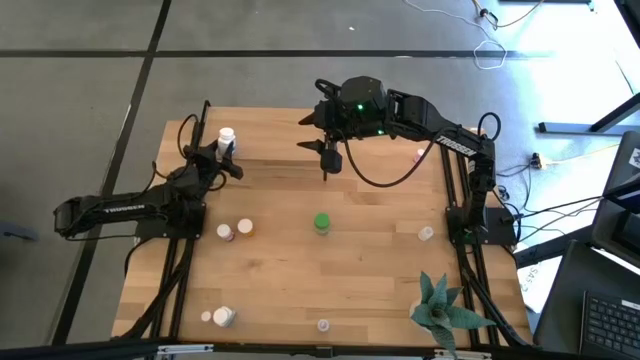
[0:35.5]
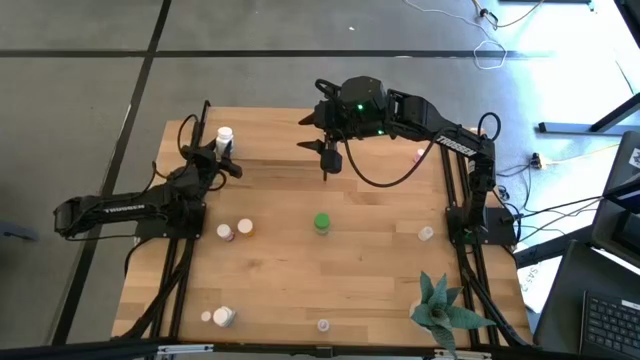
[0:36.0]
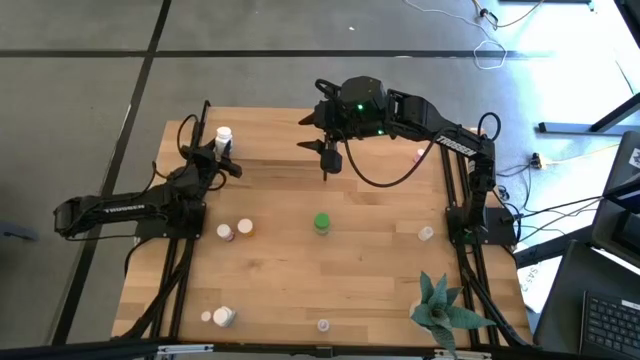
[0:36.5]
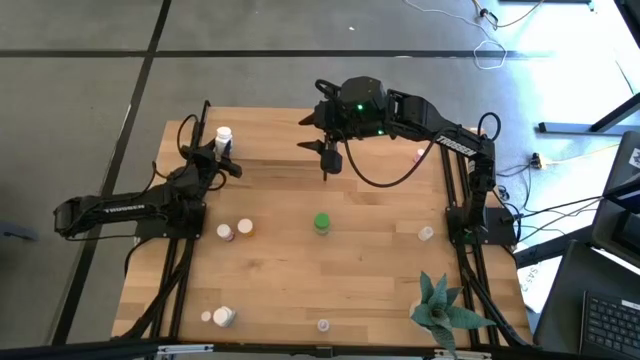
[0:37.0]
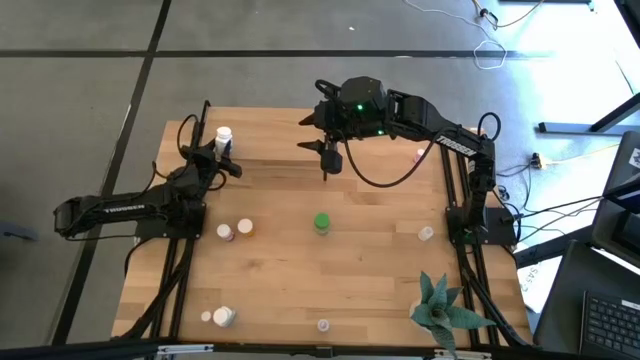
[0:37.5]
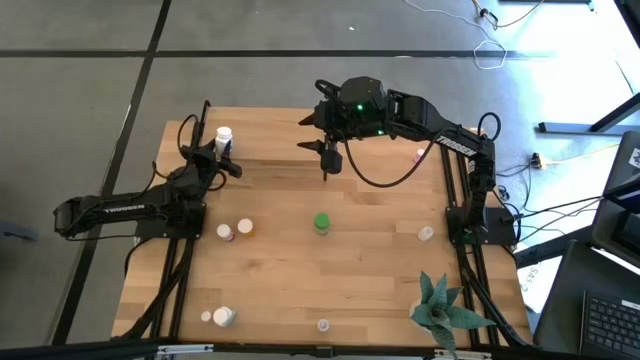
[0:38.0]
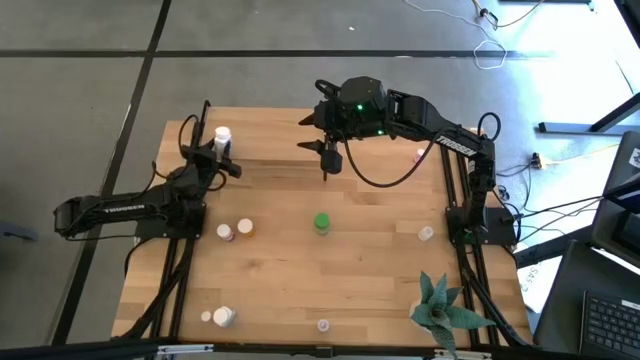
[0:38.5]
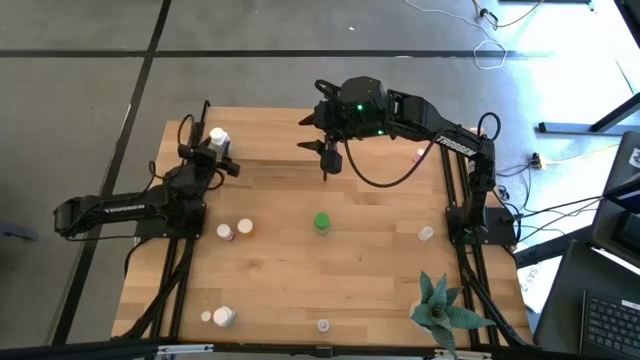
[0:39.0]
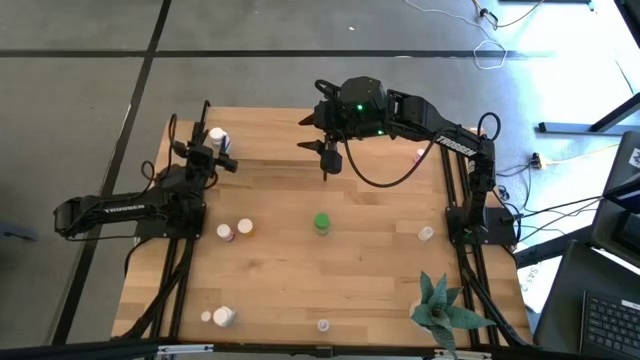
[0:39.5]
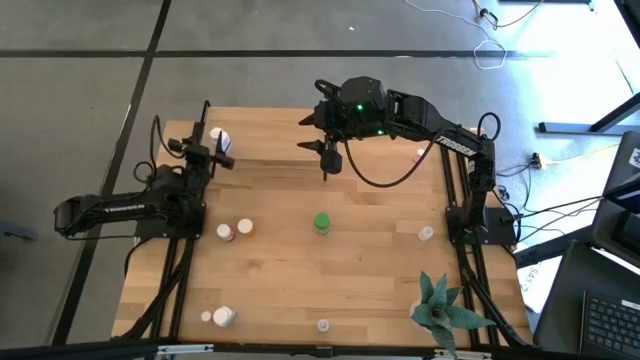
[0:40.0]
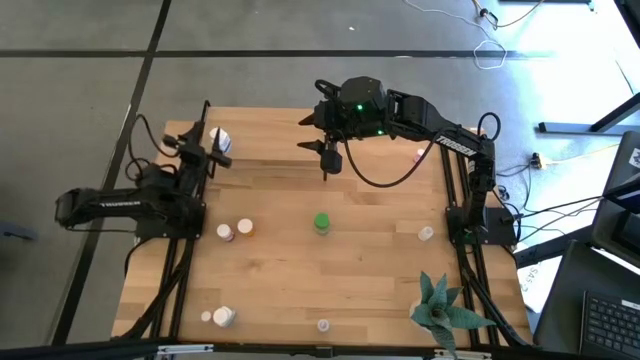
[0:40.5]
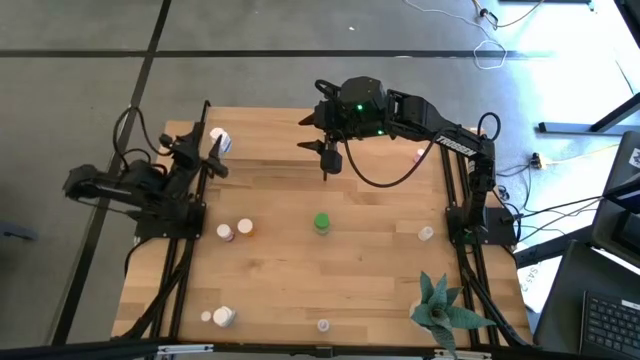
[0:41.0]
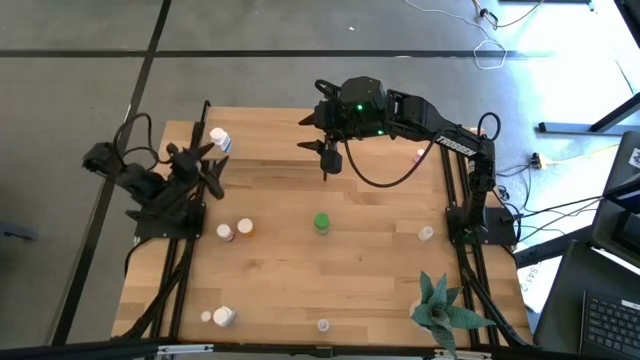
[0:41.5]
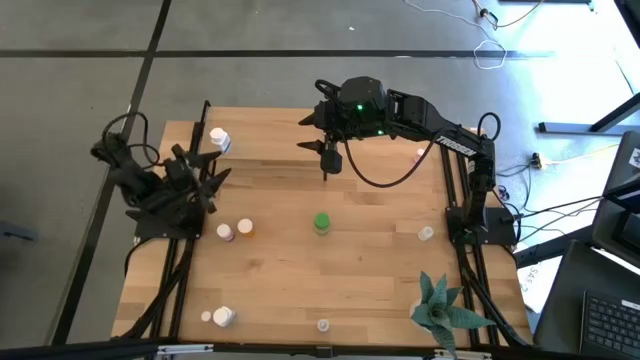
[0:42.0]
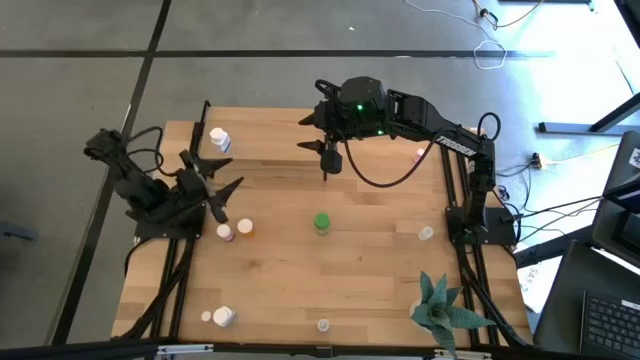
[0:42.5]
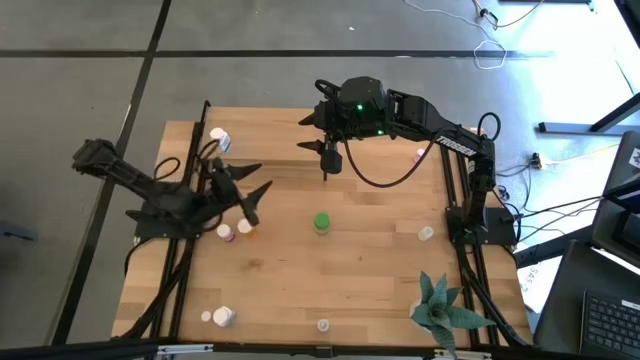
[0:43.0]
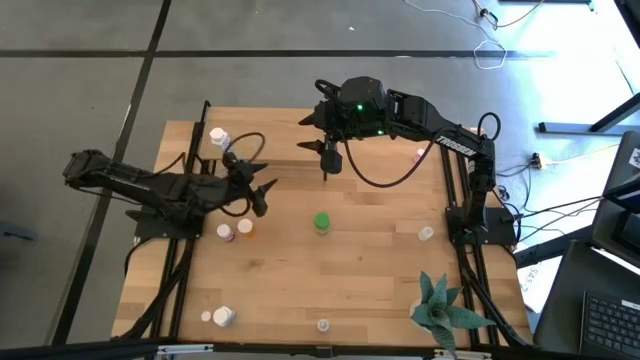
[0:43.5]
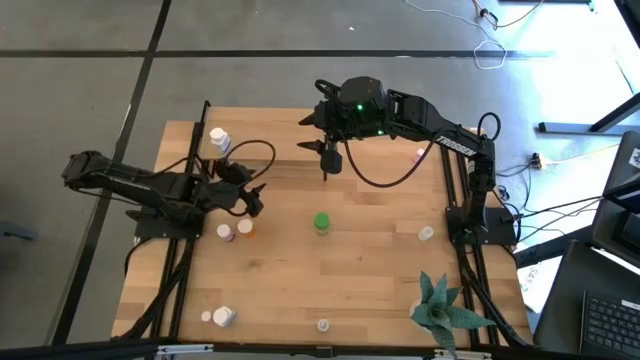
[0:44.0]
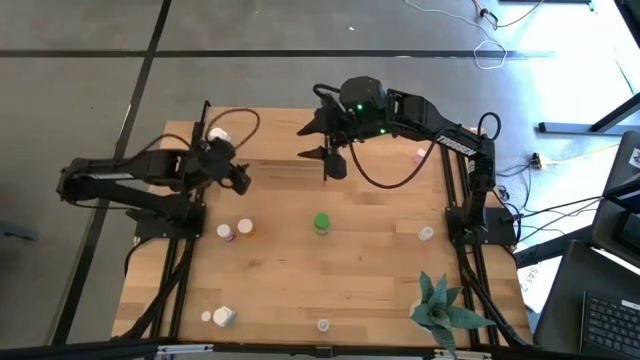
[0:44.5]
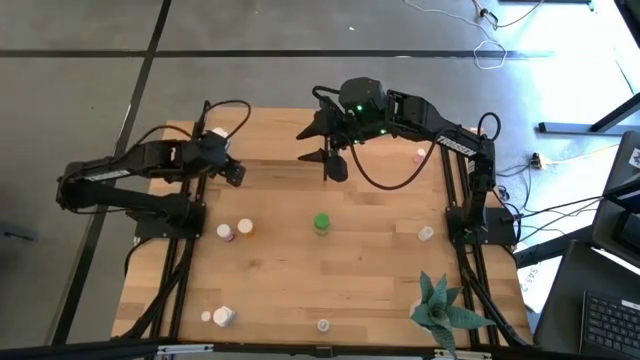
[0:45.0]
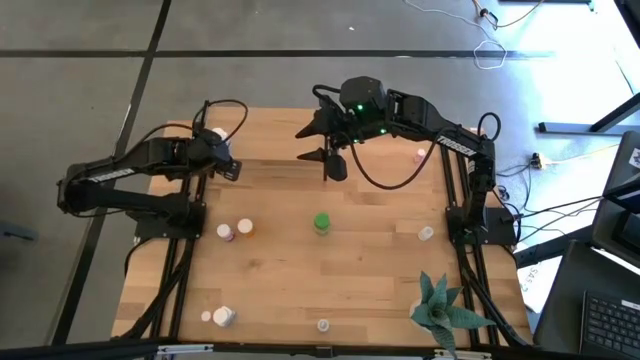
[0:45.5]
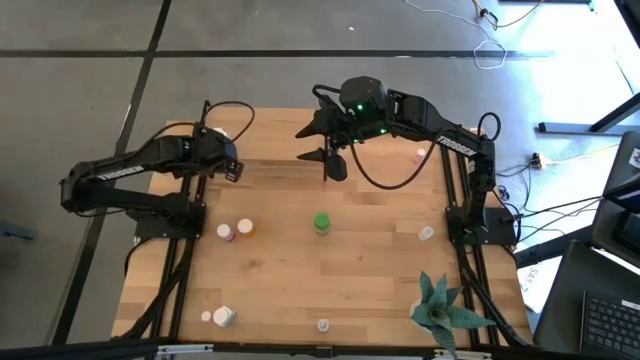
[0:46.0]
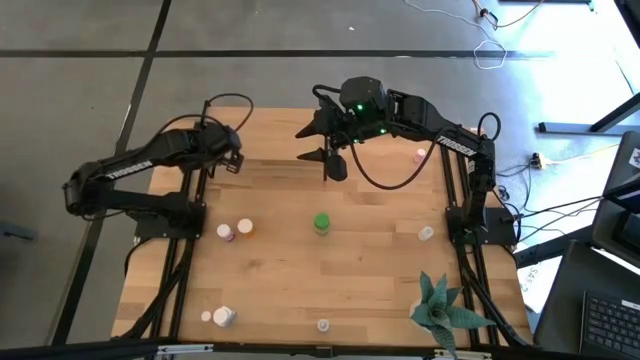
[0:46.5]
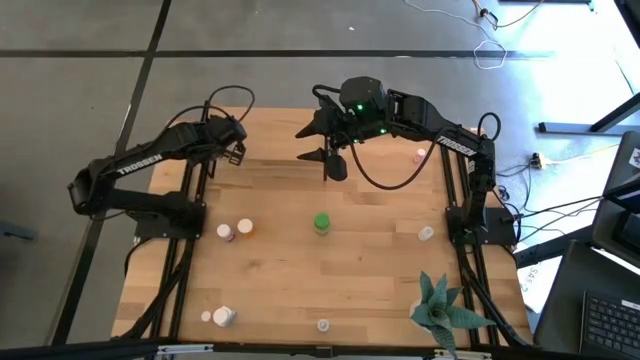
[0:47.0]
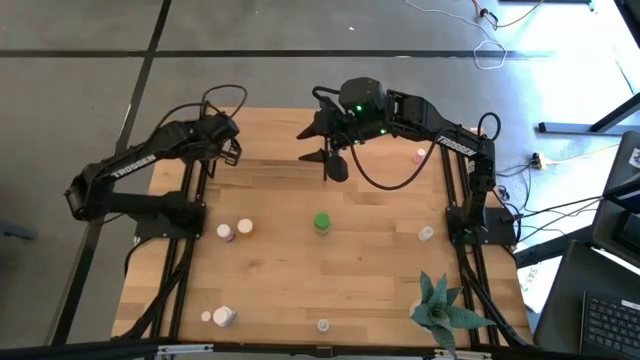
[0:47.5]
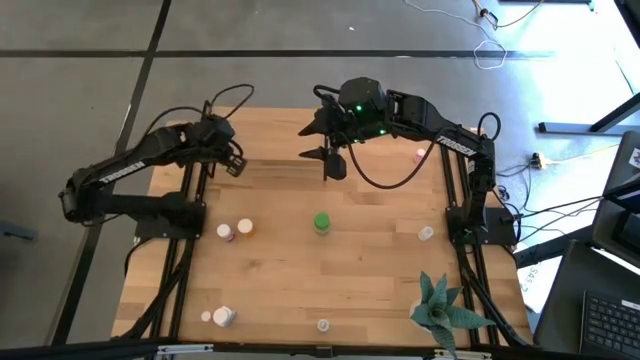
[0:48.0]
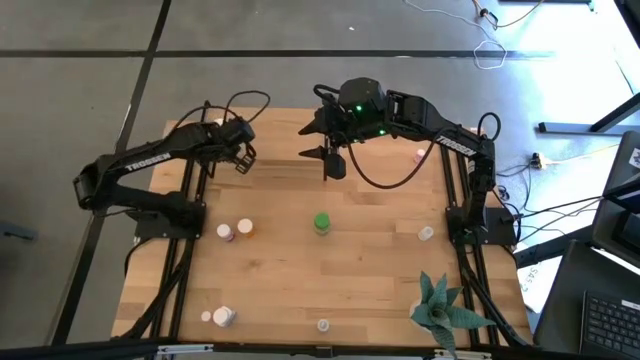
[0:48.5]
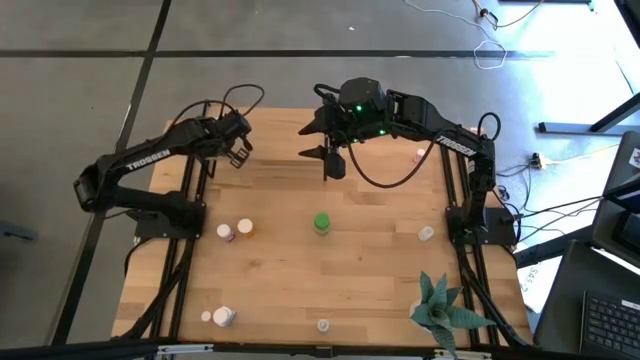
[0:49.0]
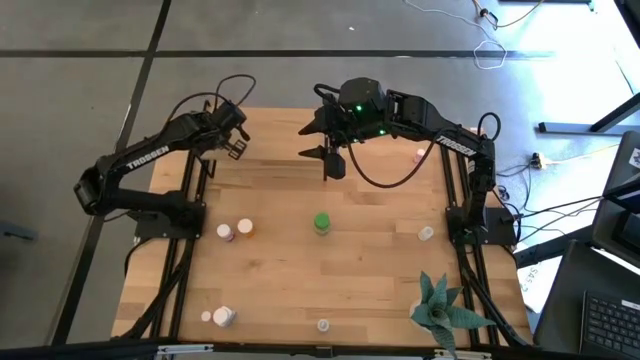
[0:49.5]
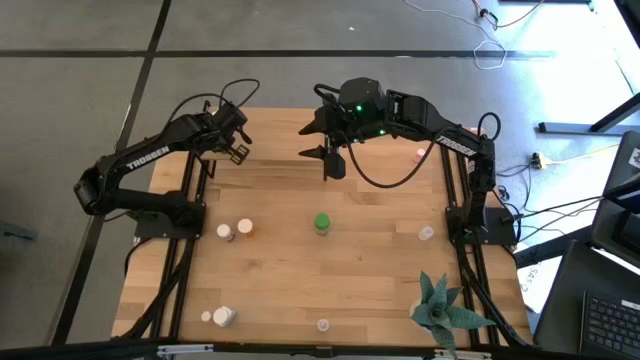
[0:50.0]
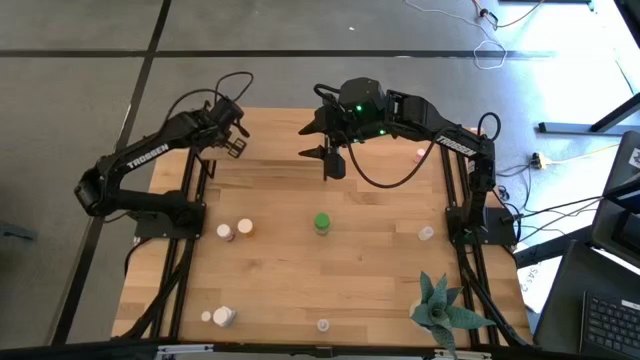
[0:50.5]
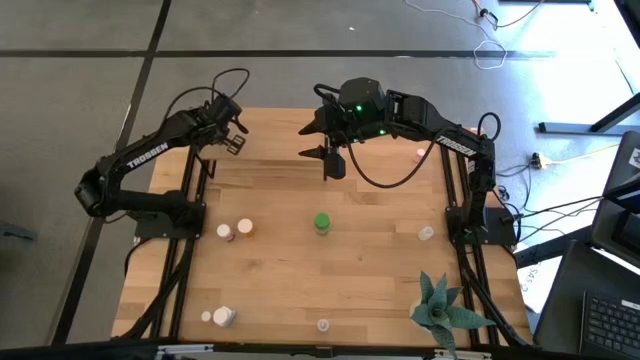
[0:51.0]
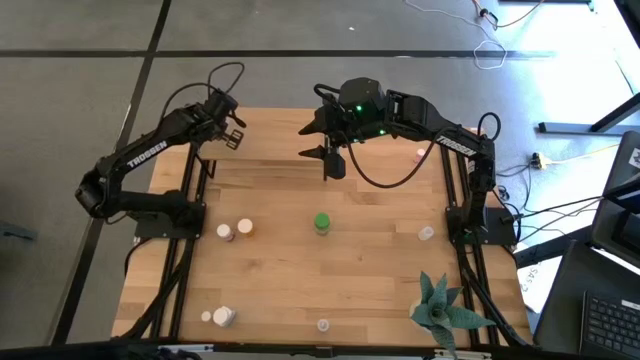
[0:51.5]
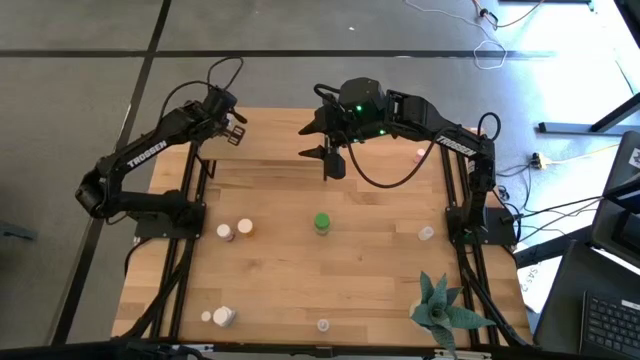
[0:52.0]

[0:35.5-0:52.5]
Task: Pick and place medicine bottles onto shelf by color
Put the top white pill bottle on the shelf

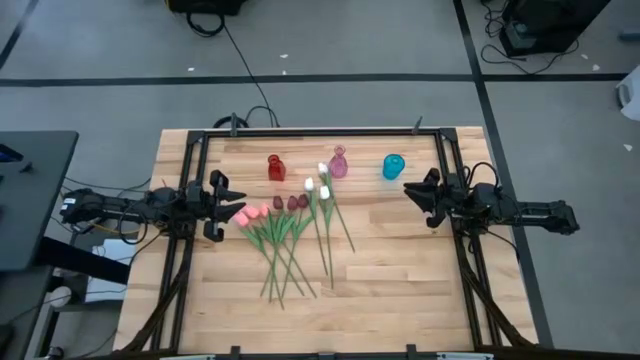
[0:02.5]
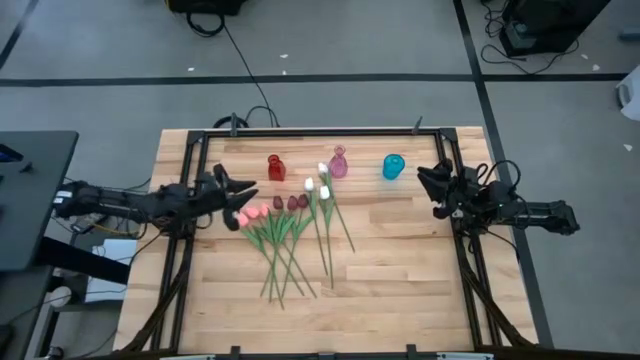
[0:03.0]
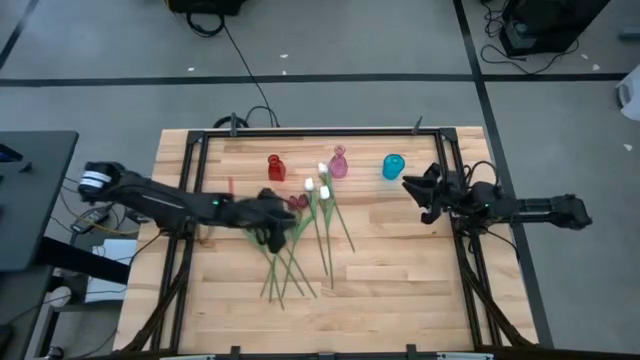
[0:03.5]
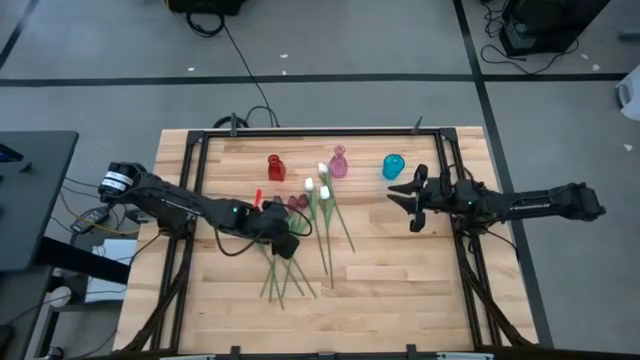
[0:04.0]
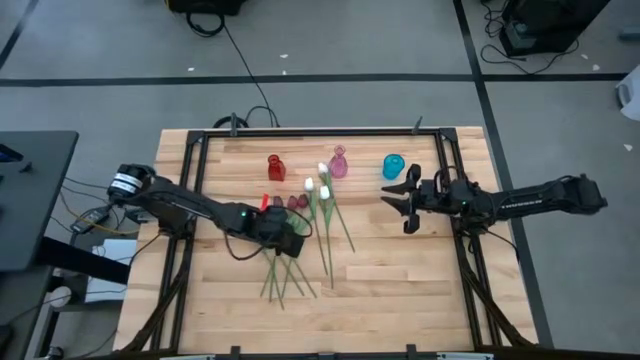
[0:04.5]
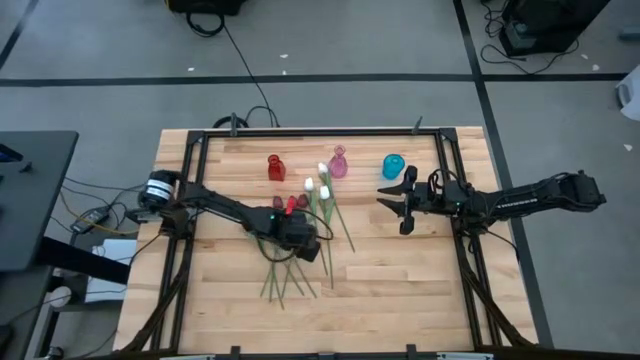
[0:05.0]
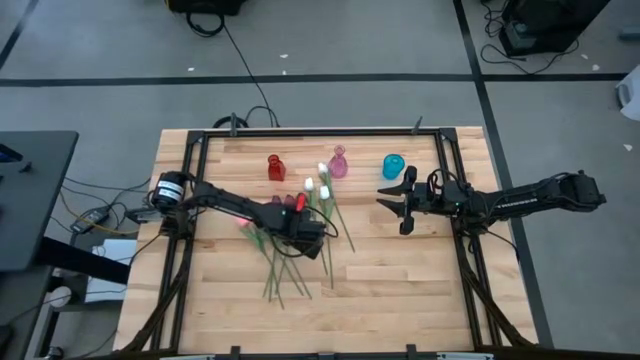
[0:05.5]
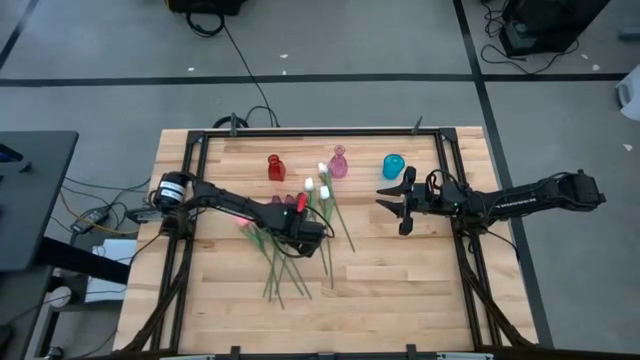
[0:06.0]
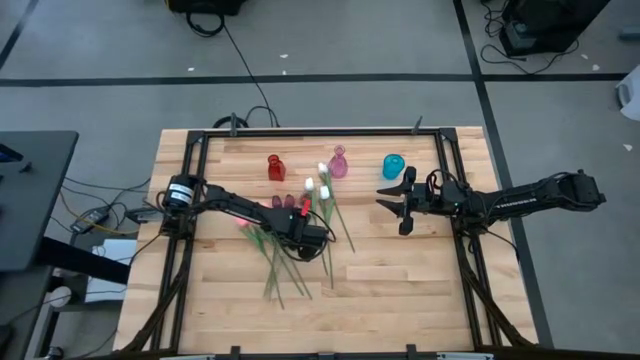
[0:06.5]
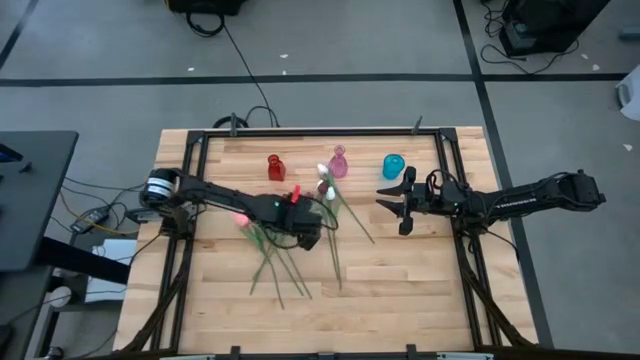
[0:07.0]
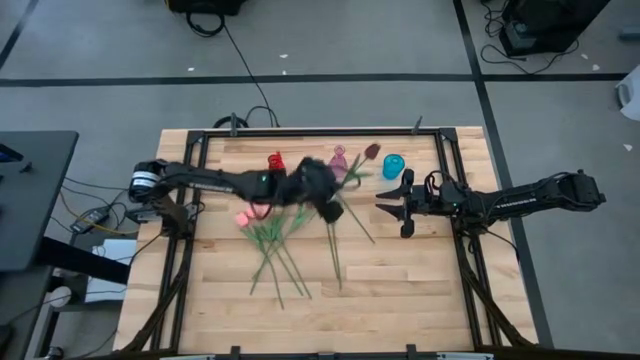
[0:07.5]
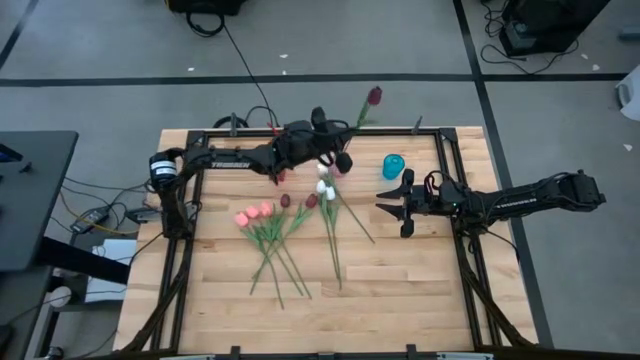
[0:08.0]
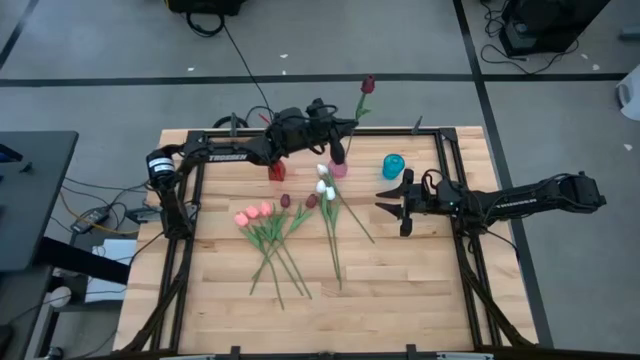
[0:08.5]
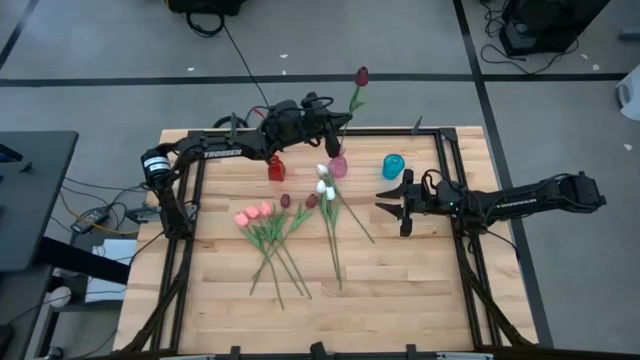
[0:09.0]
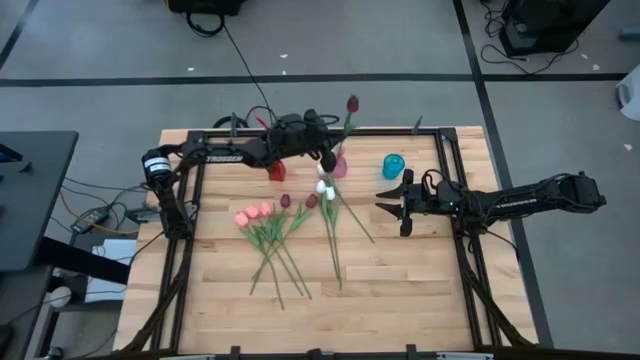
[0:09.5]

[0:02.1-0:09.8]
Task: Sort flowers into vase by color
Put the right dark red flower into the pink vase
